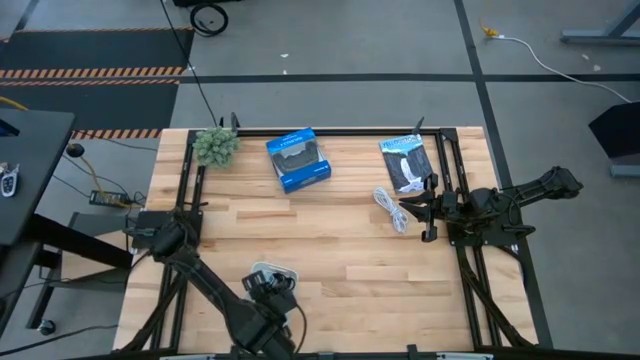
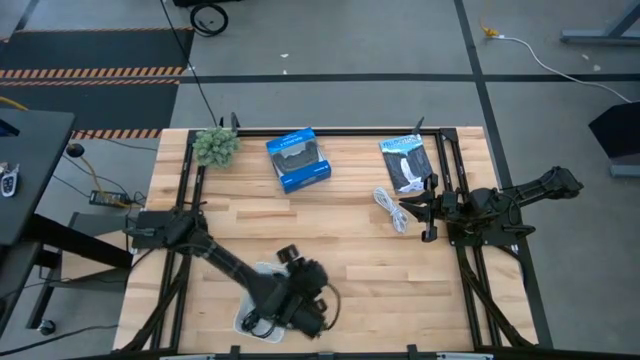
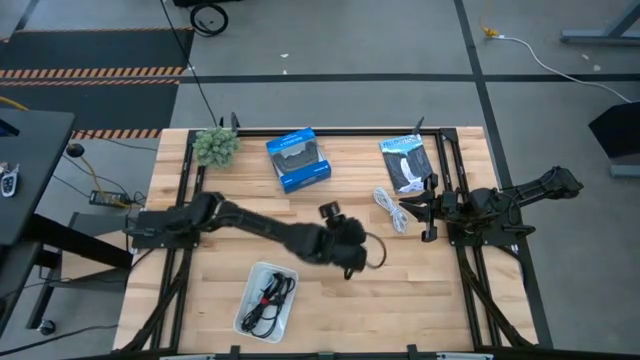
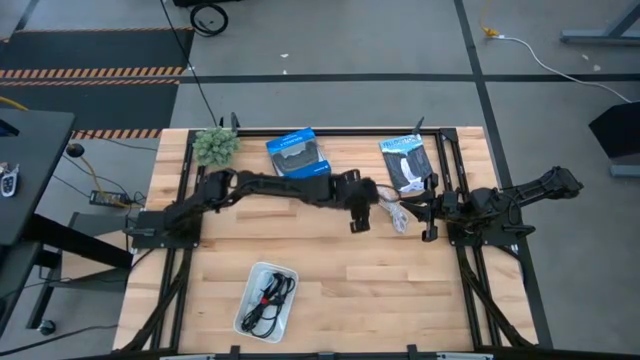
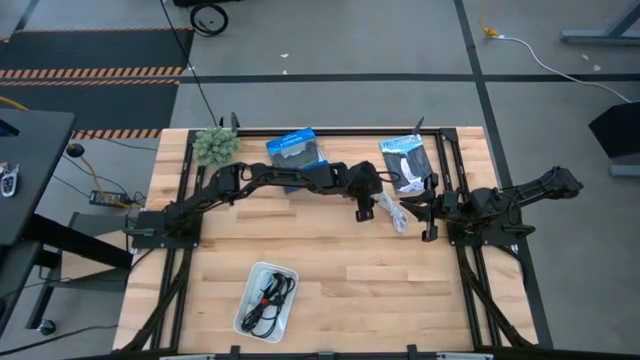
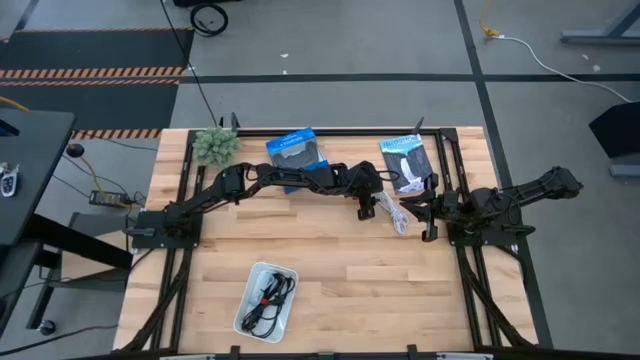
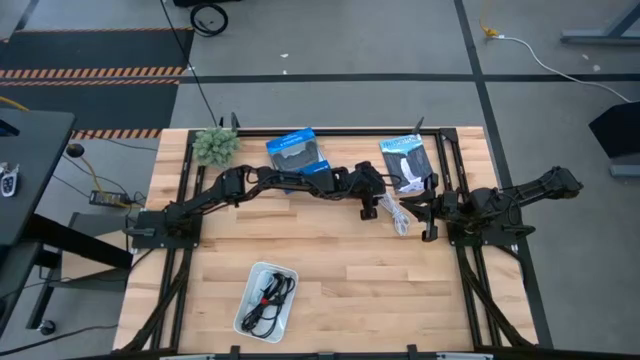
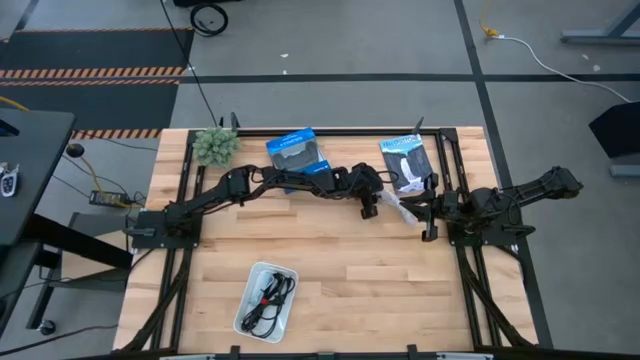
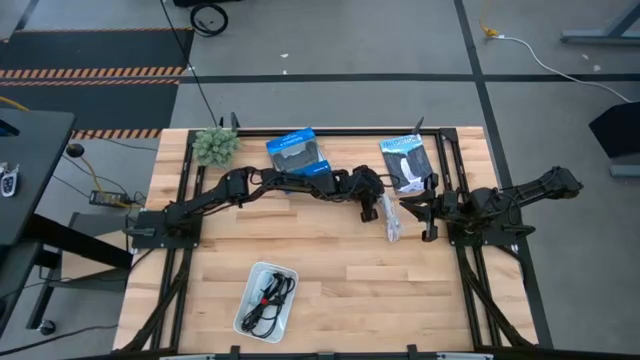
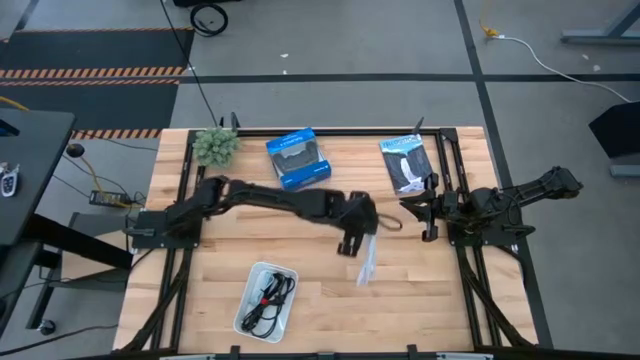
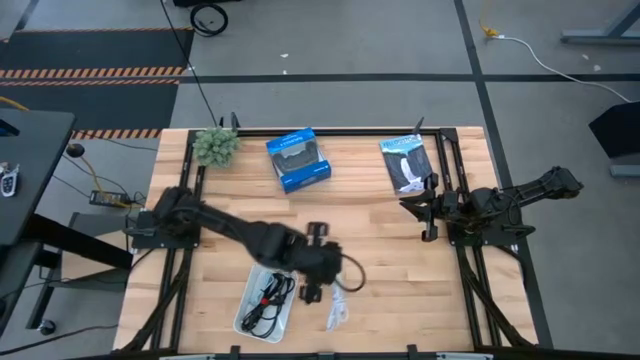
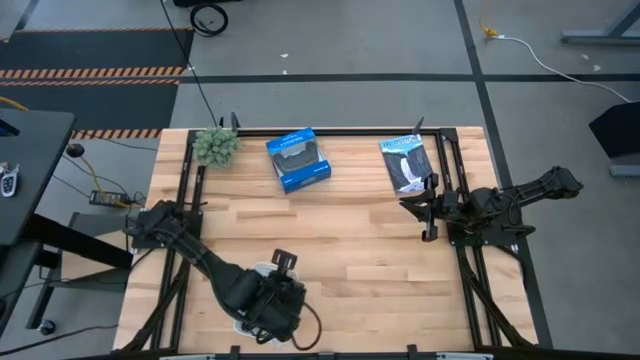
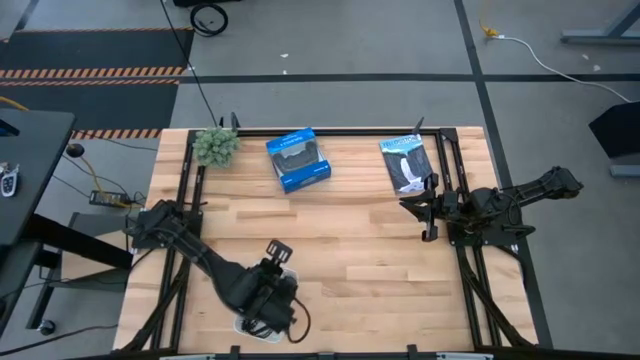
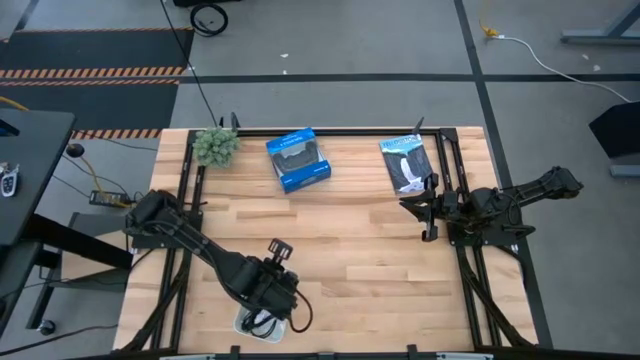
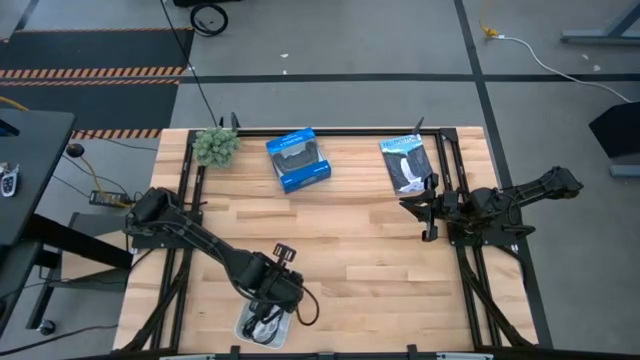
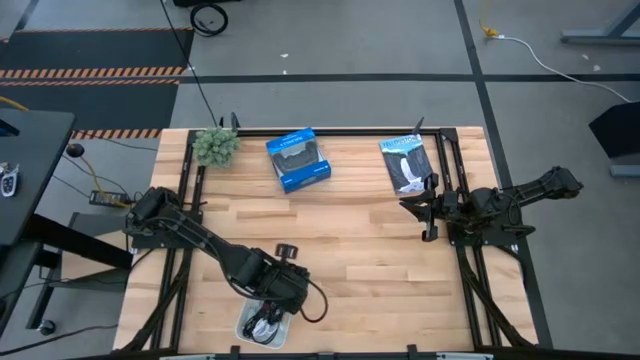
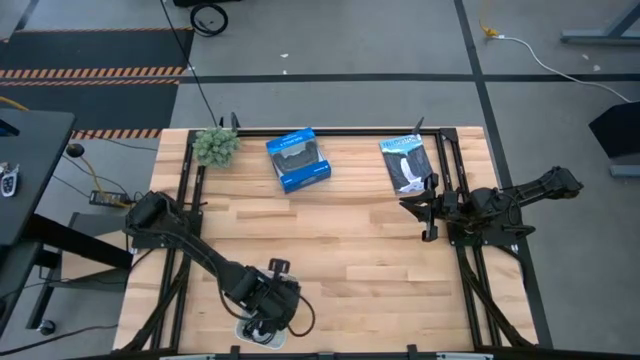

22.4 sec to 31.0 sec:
Task: Pick and place USB-C Cables
Put the white charger cable into the bin

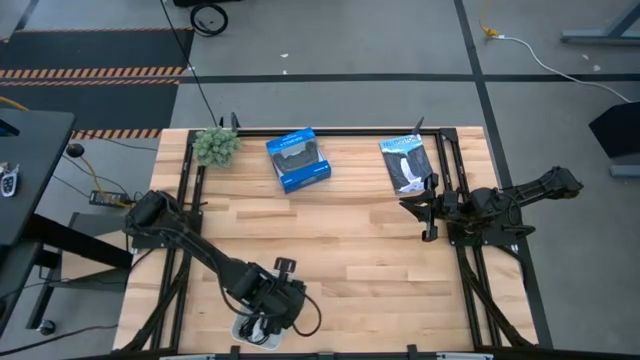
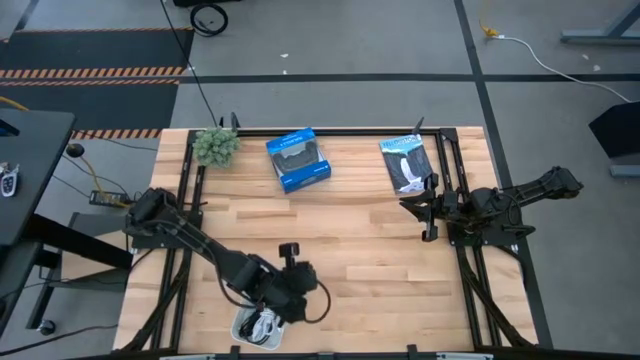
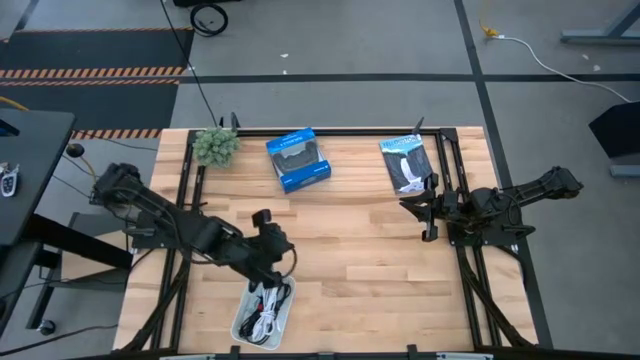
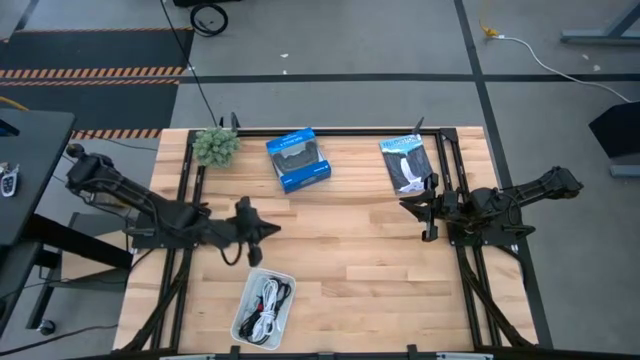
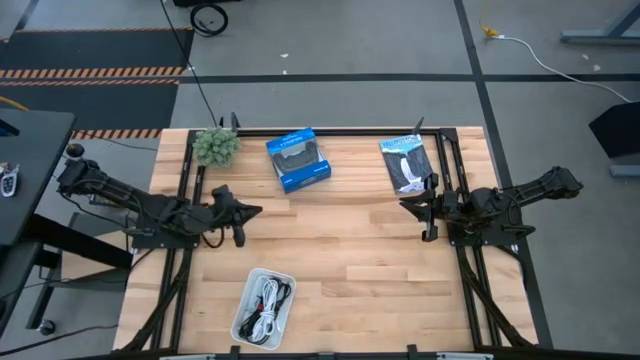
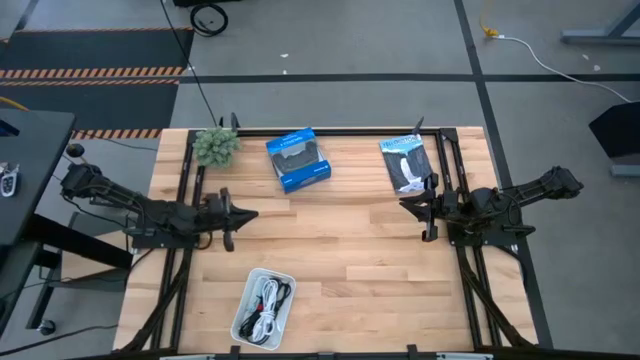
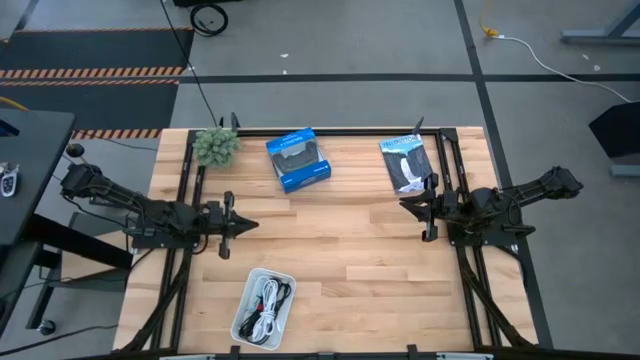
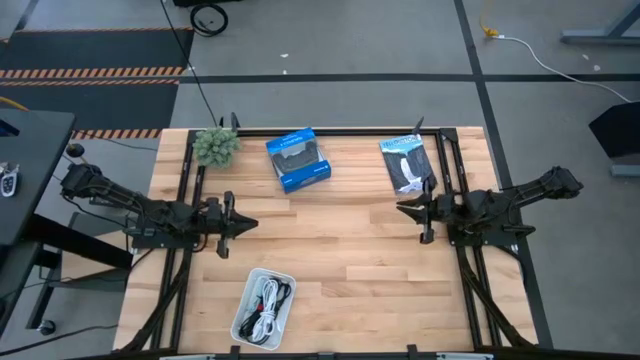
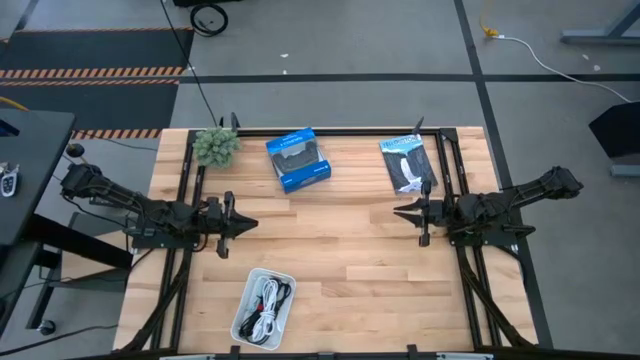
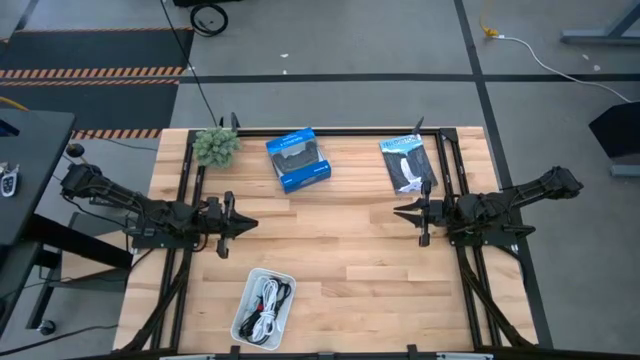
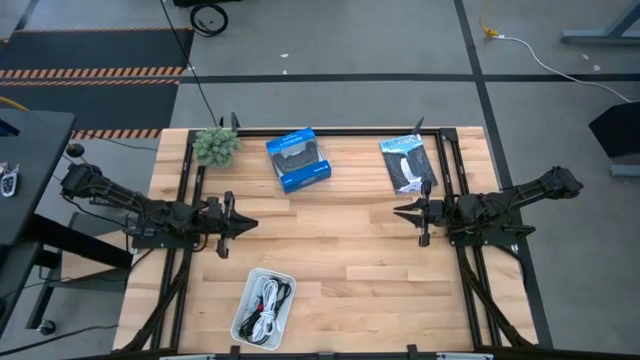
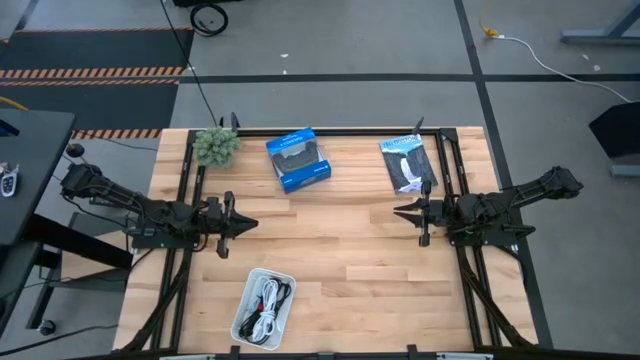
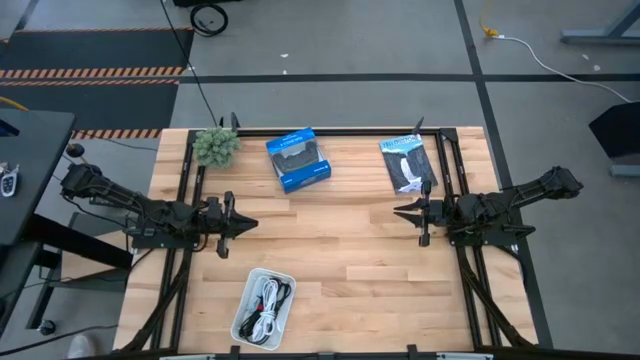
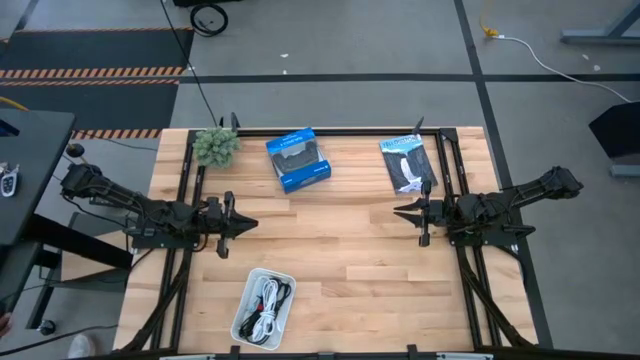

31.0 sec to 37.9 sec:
Return to Home Position

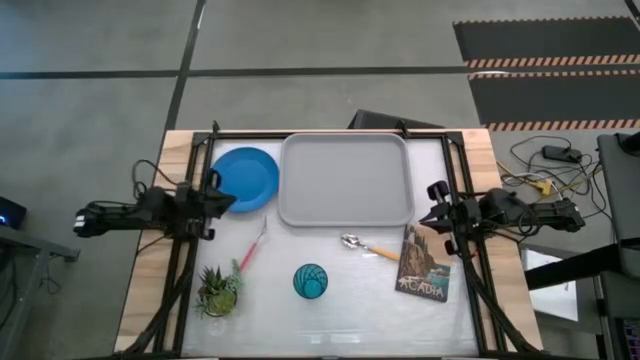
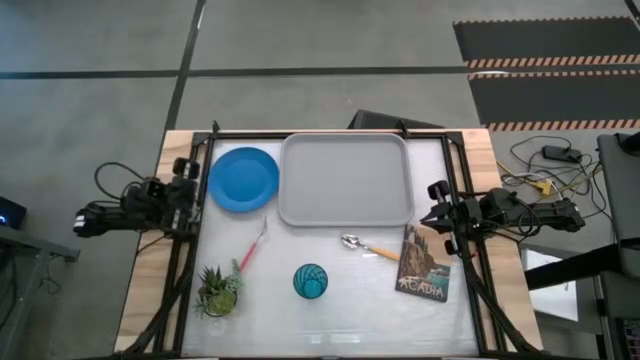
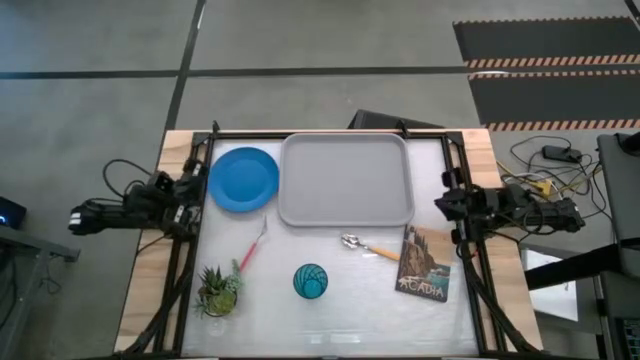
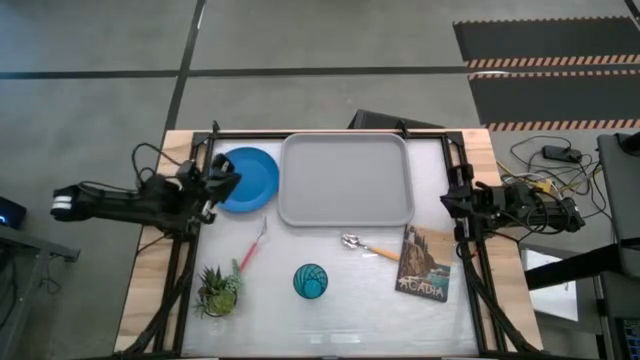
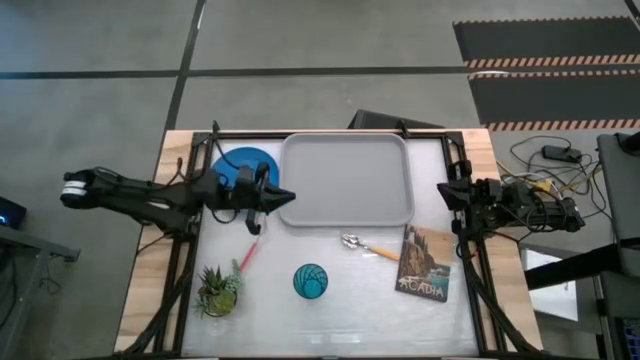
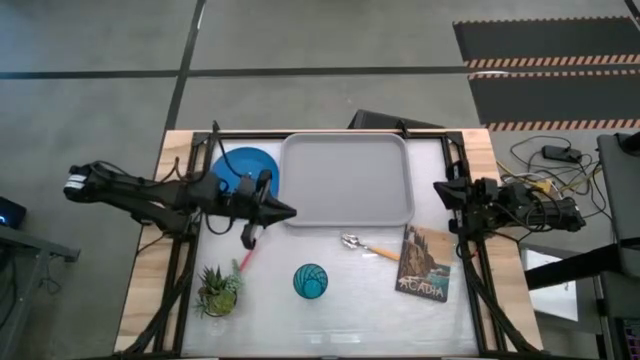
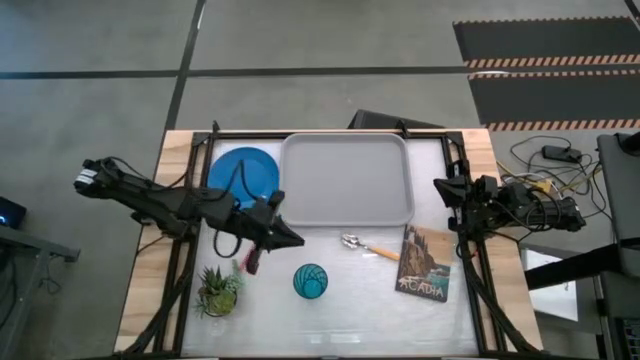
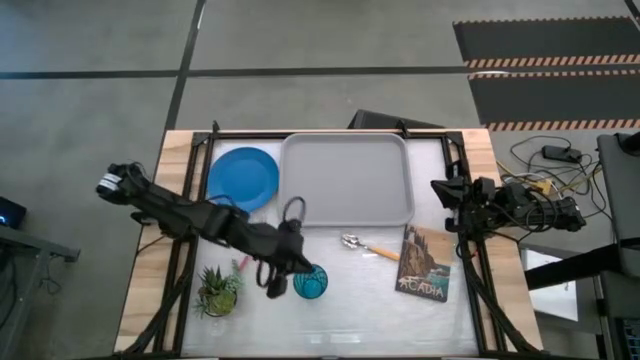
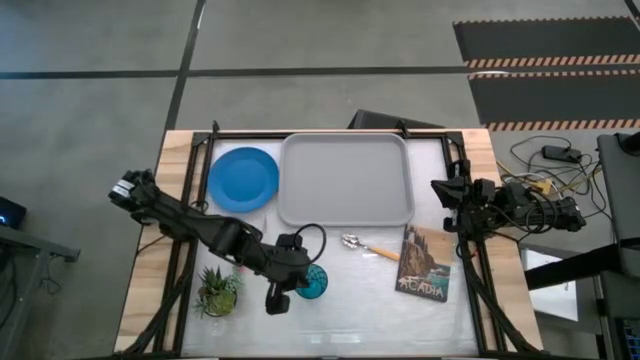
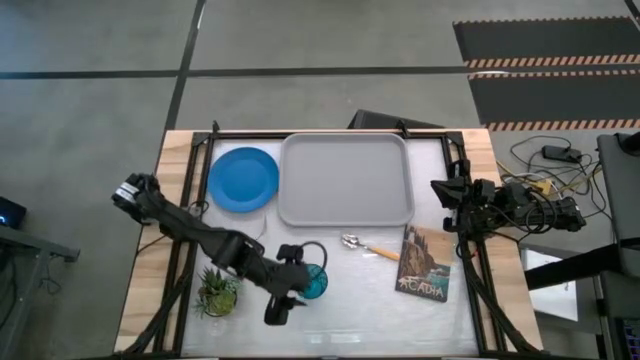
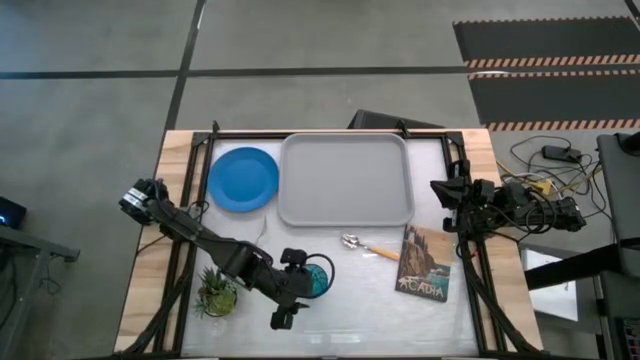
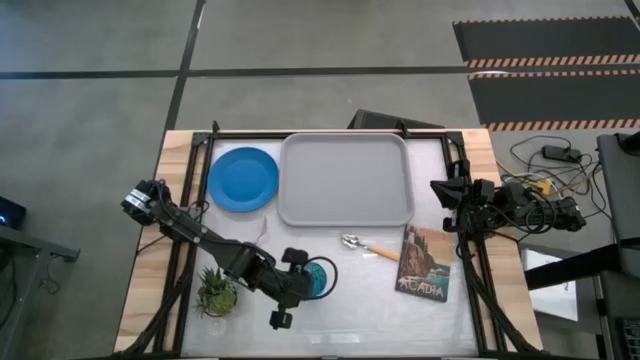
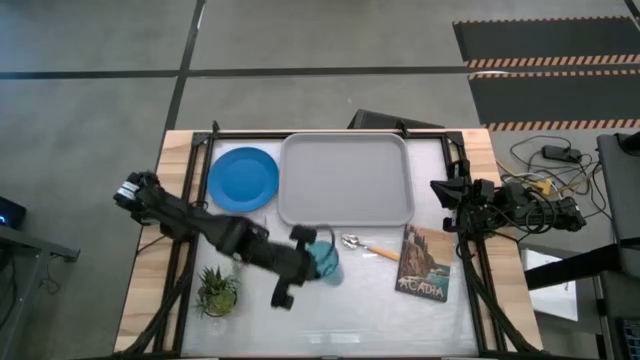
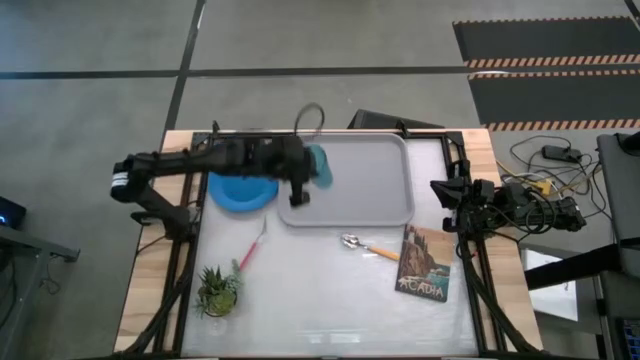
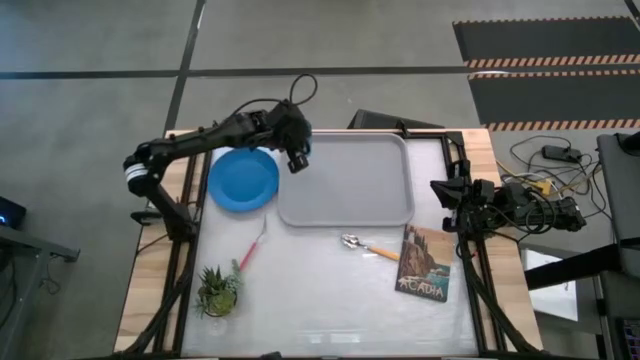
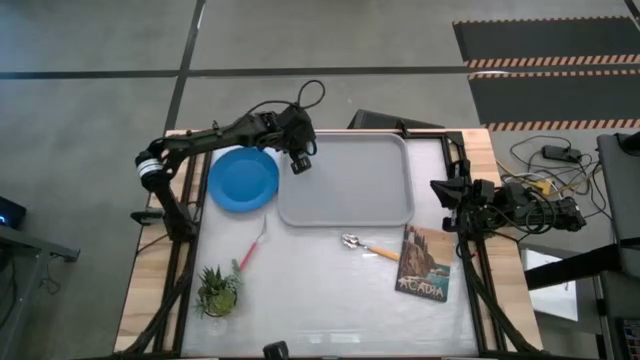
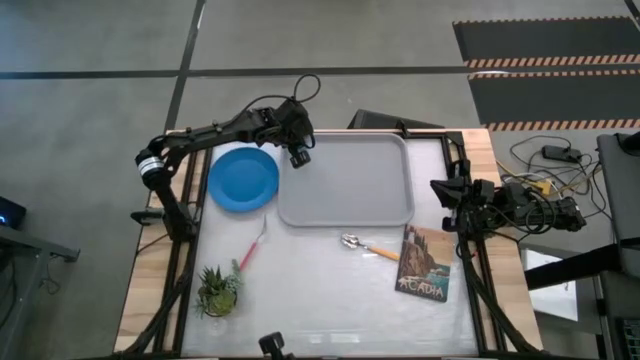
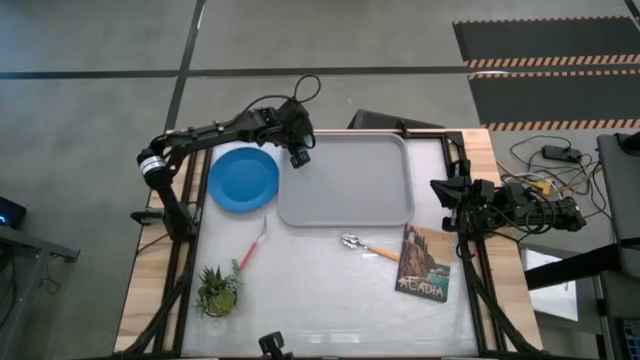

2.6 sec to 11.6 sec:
Task: Pick and place plate/cup/fork/spoon on tray
Put the blue glass on the gray serving tray
